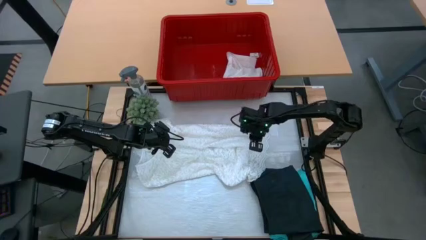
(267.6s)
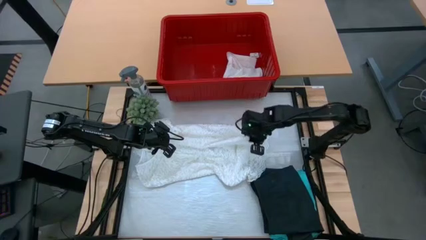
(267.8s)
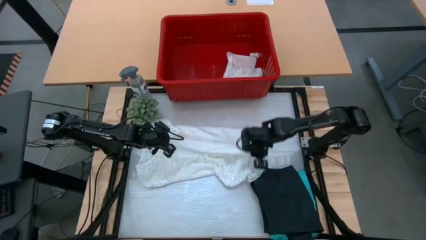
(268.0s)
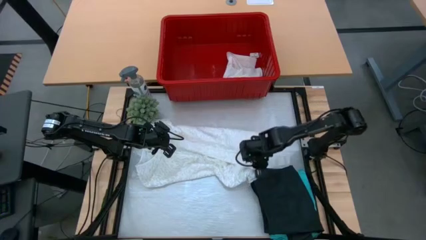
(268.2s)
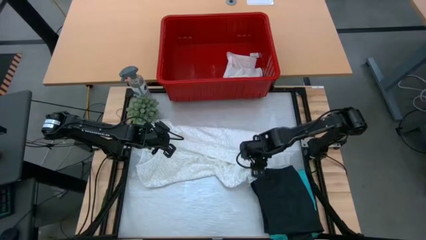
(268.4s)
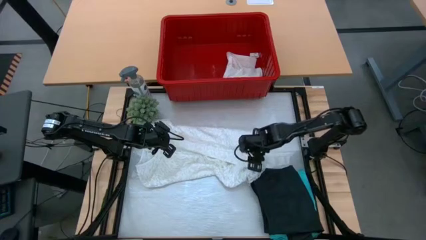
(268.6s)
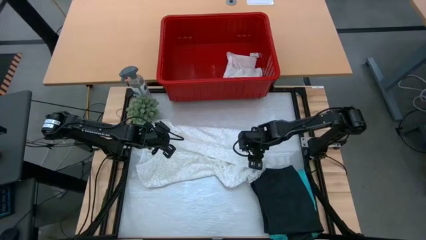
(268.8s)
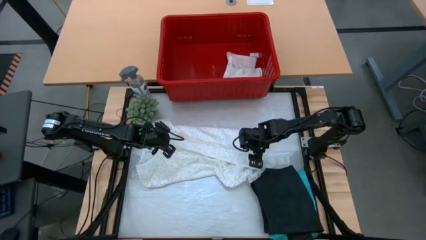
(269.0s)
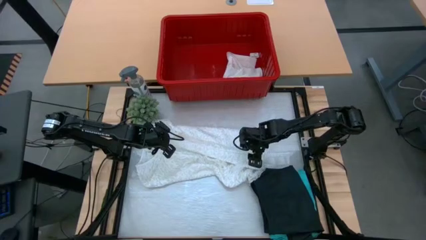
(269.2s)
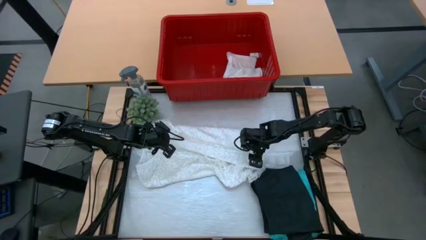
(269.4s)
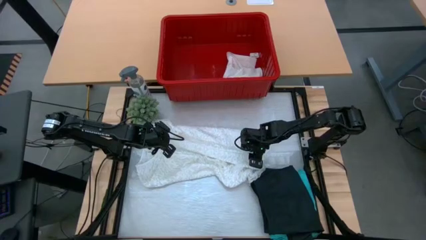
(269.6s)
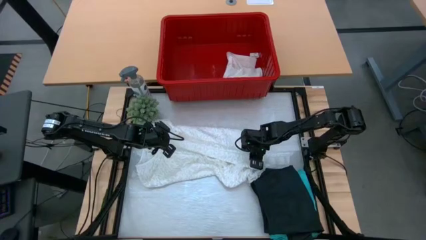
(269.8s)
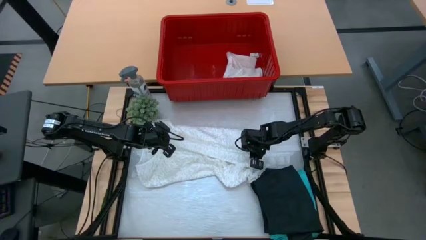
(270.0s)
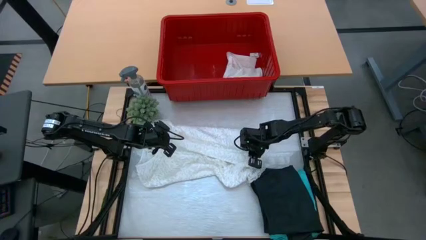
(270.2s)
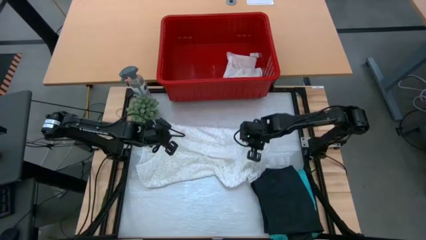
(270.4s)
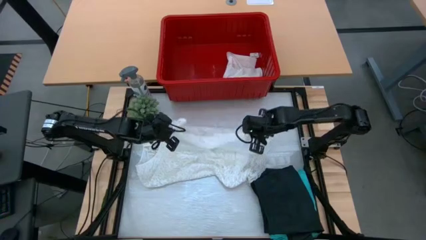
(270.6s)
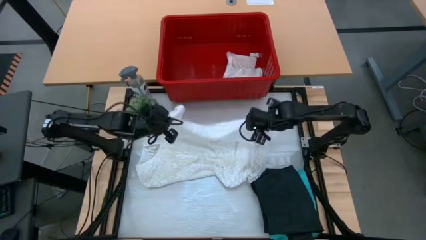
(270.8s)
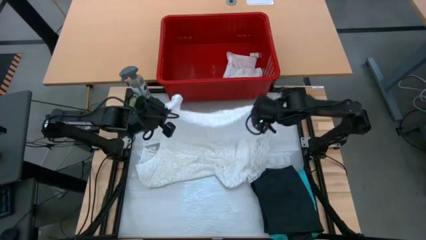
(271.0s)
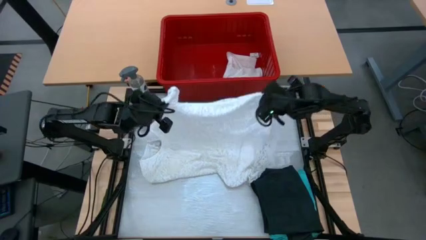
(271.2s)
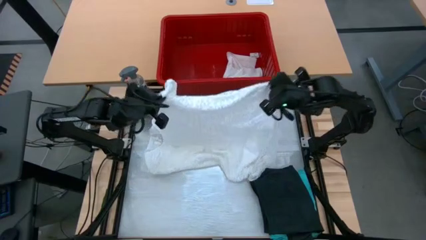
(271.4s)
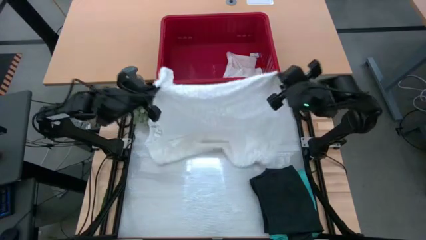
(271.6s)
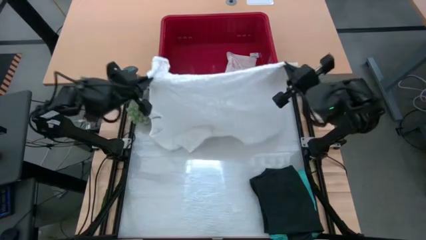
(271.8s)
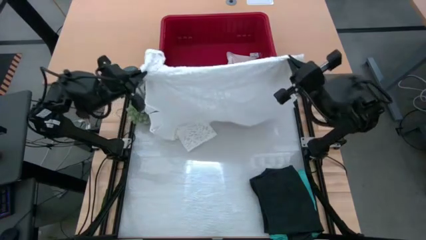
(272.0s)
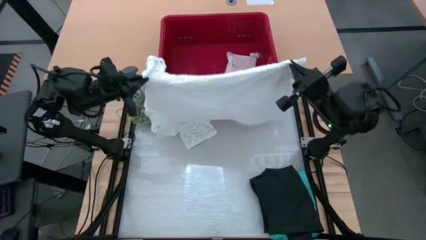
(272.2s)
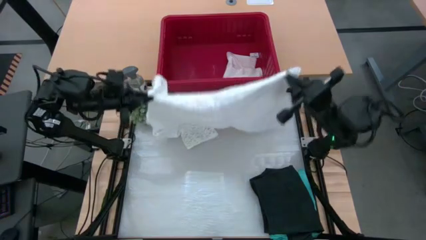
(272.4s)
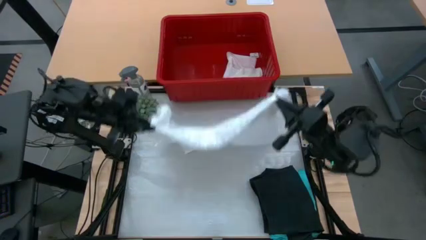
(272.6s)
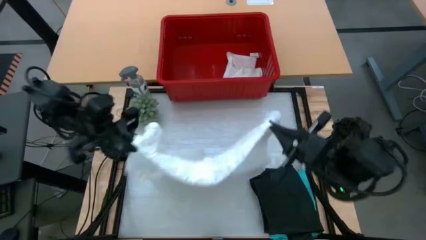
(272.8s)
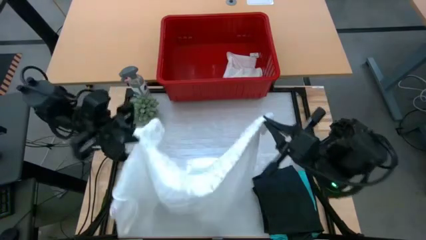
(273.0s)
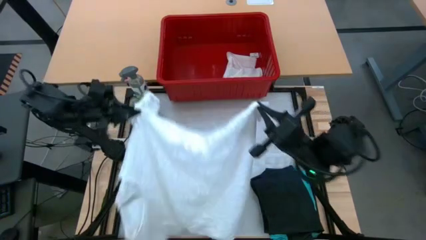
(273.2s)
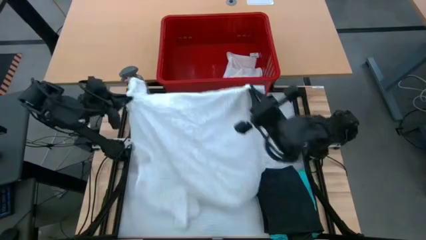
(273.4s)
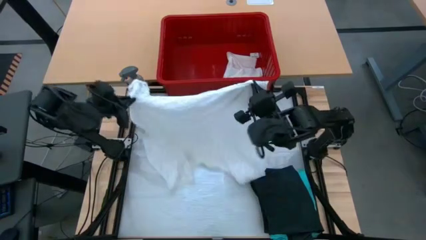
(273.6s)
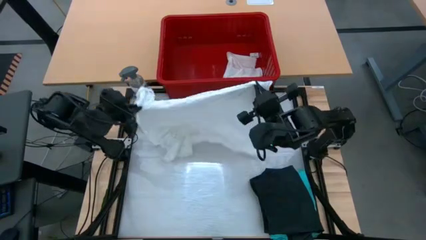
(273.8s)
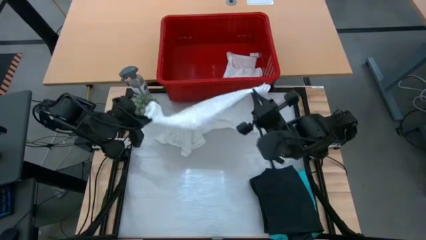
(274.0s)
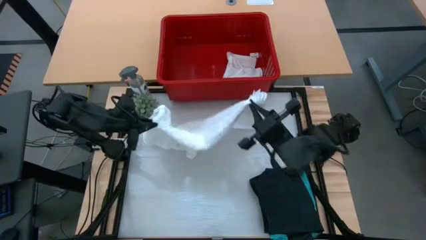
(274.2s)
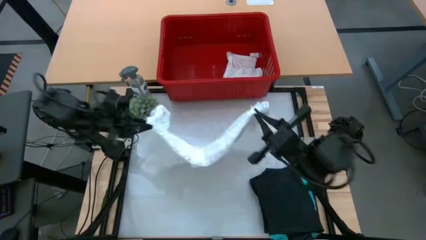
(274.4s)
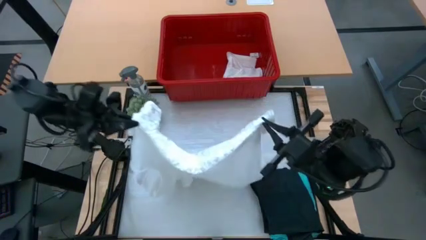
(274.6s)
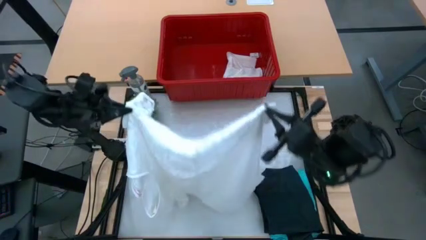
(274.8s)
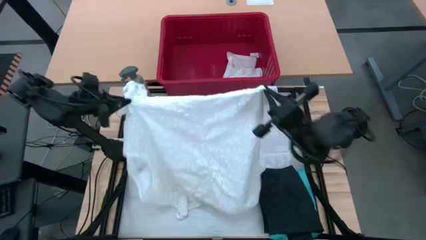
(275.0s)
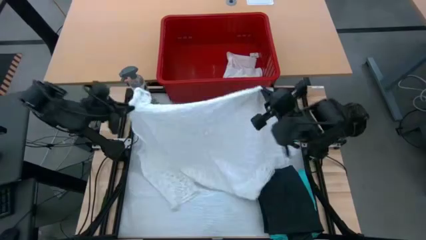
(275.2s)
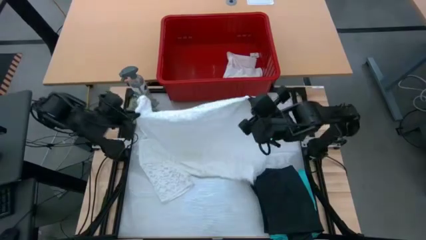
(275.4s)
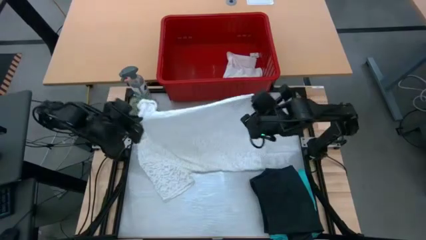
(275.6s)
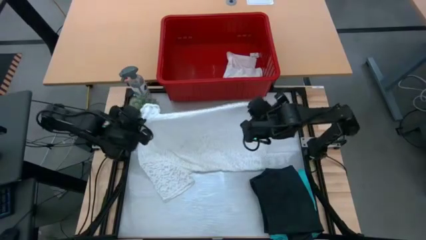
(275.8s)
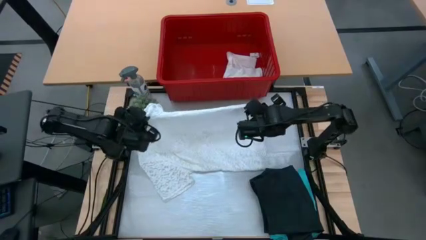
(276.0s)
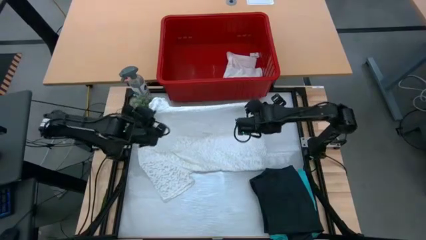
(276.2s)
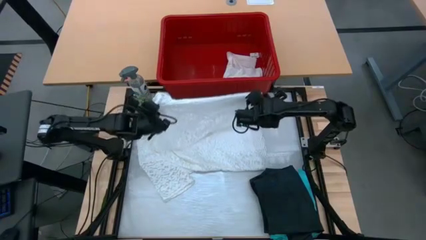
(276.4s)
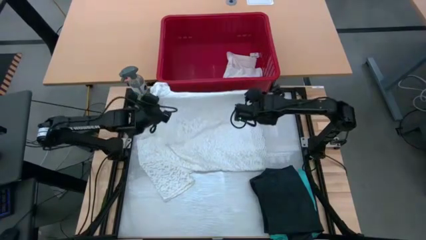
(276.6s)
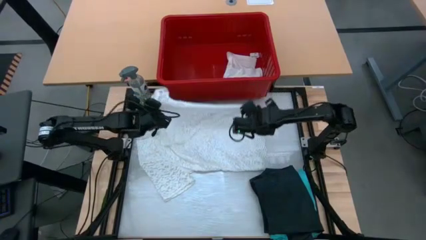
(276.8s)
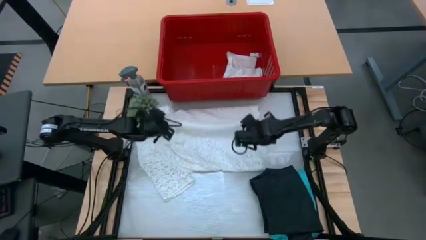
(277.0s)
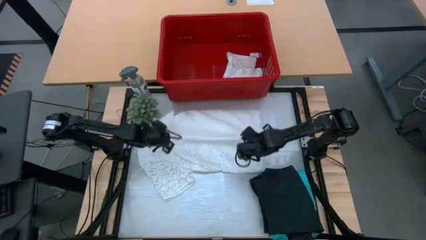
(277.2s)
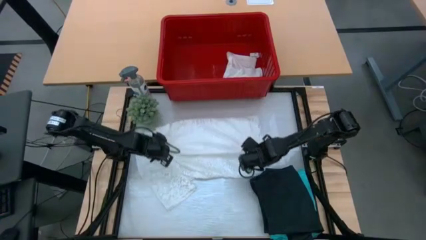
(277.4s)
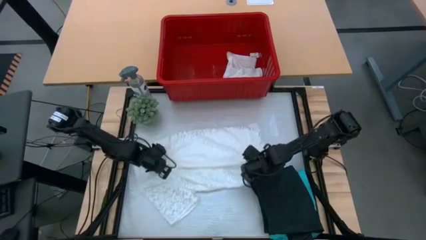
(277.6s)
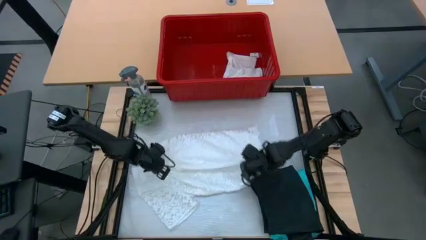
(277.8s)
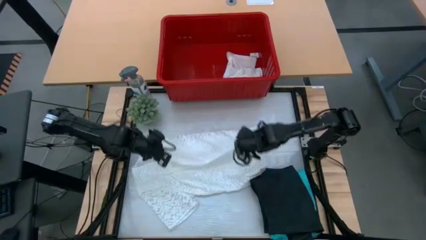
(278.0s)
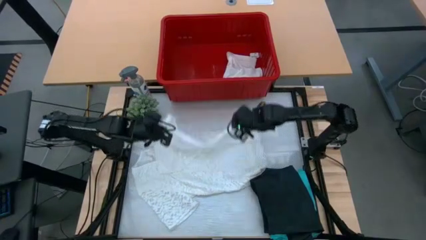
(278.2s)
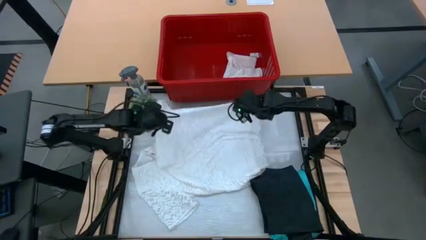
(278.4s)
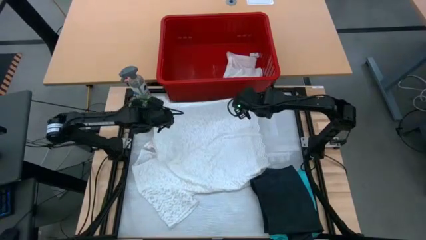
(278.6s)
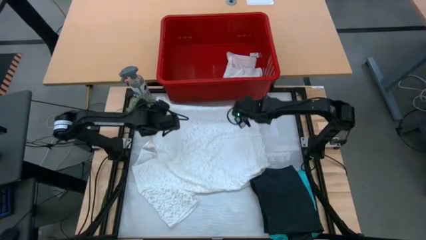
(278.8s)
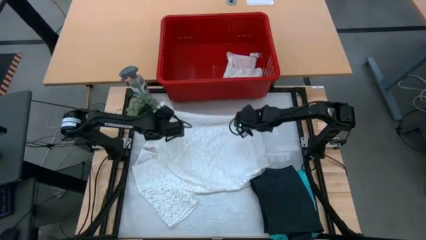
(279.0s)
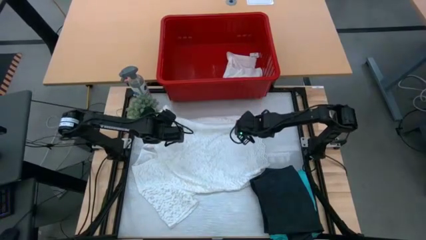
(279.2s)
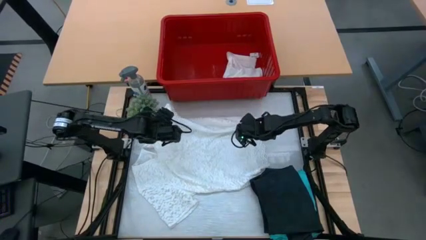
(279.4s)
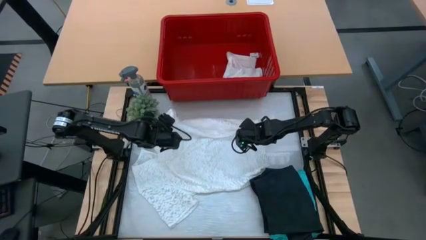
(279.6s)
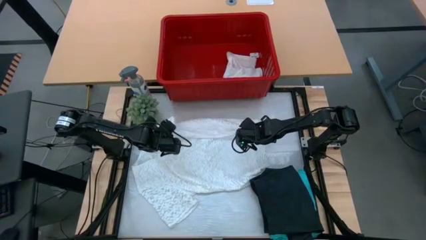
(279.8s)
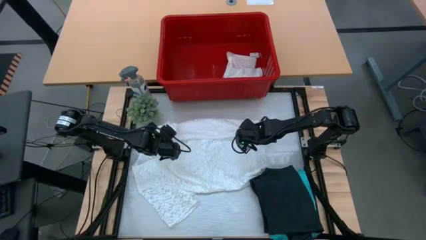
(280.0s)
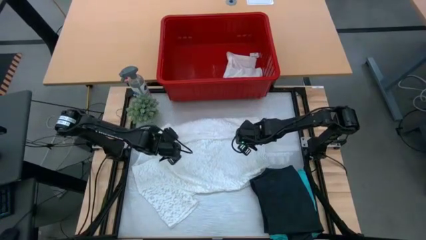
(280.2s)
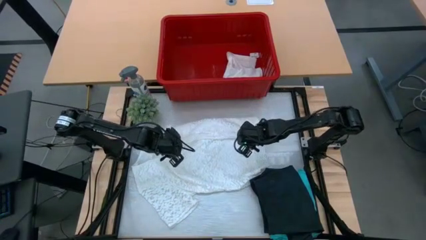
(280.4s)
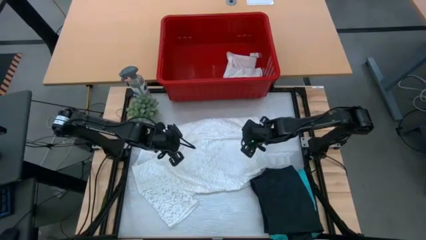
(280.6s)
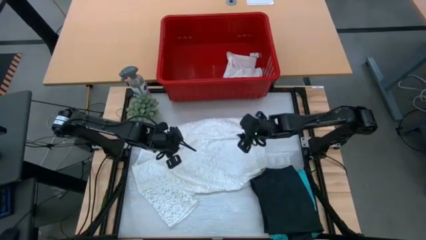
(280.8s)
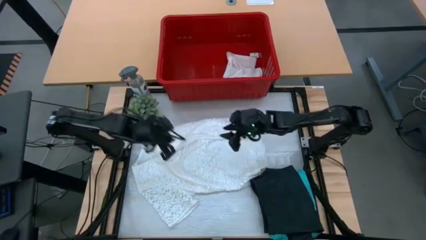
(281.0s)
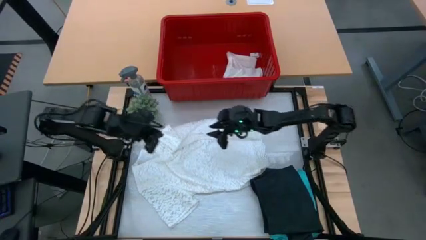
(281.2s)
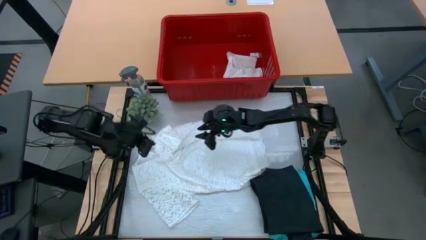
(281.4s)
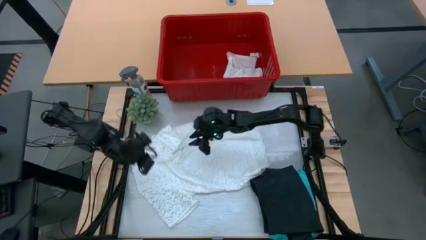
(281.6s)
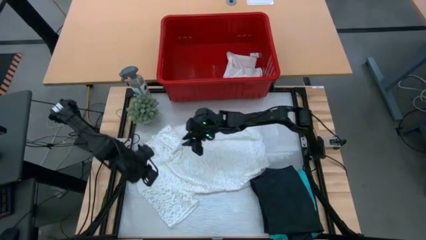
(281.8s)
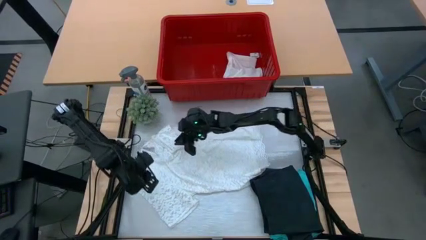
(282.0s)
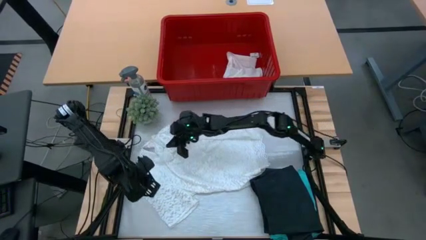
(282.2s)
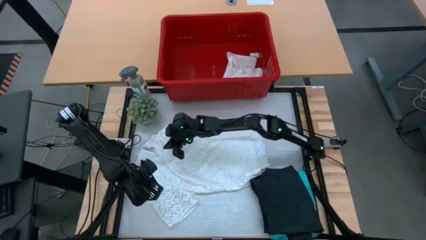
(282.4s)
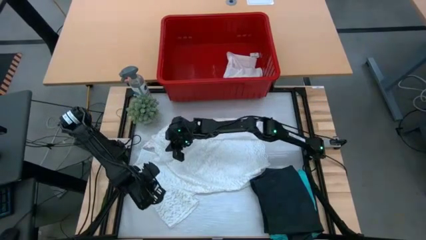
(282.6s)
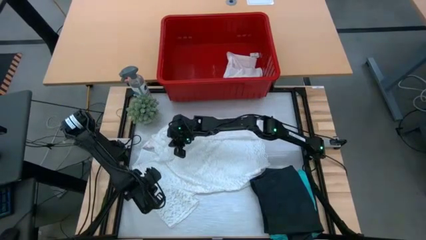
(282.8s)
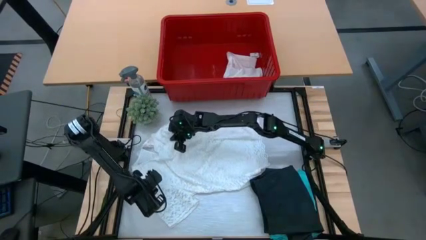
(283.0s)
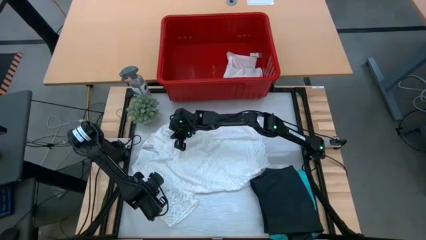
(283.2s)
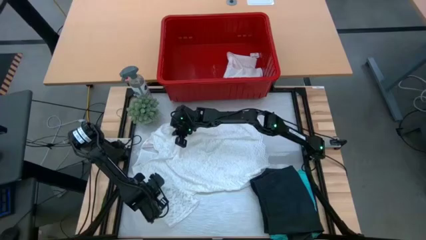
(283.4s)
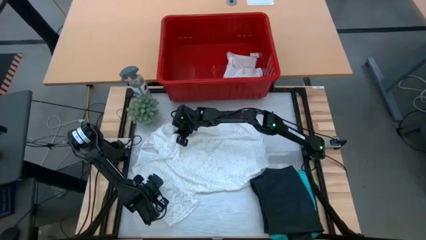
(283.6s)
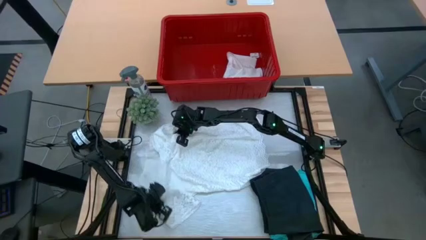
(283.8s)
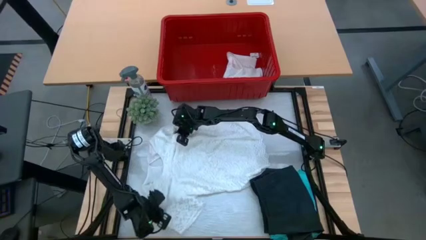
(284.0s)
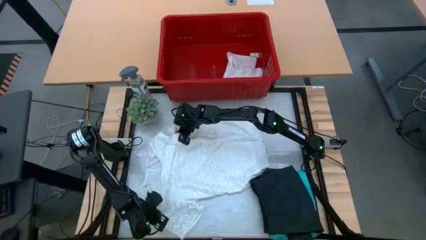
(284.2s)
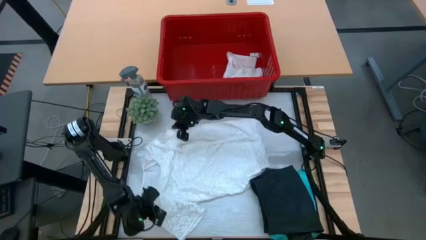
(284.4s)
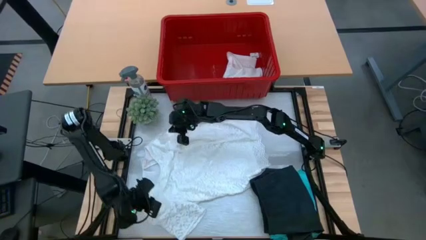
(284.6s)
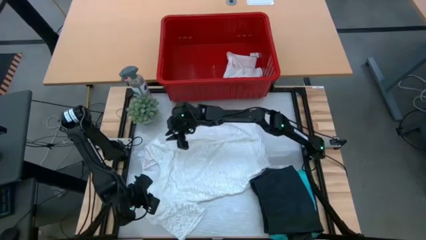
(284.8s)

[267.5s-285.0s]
Task: Fold Laundry from Bin
Fold the white t-shirt
